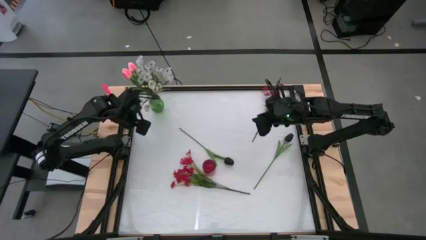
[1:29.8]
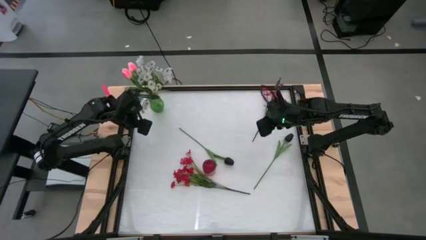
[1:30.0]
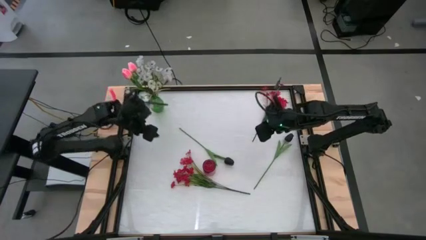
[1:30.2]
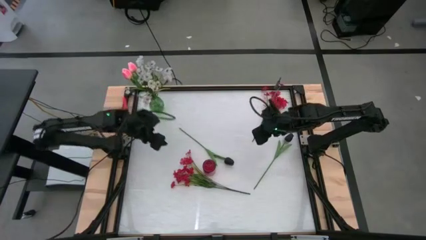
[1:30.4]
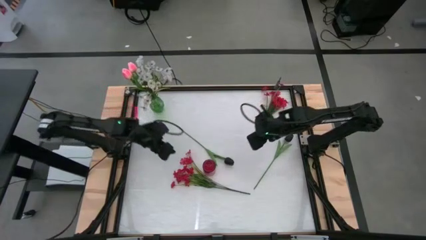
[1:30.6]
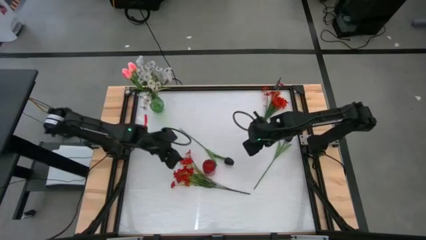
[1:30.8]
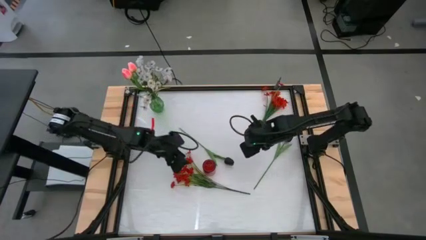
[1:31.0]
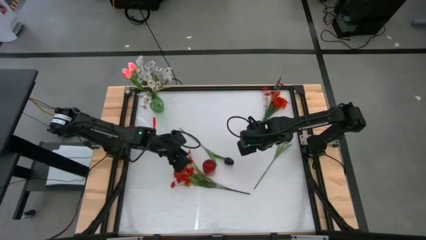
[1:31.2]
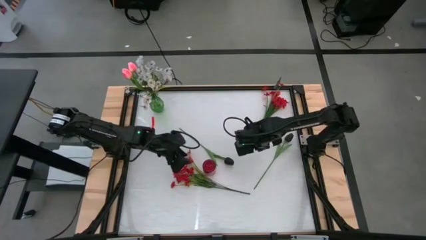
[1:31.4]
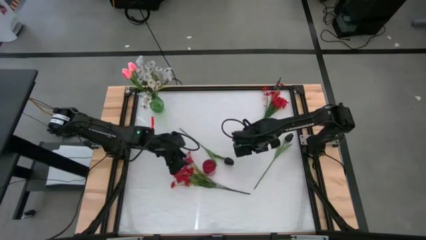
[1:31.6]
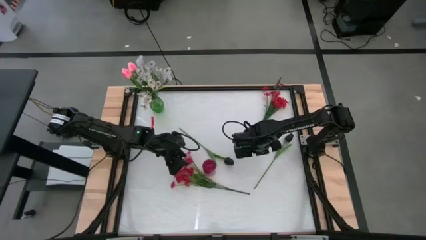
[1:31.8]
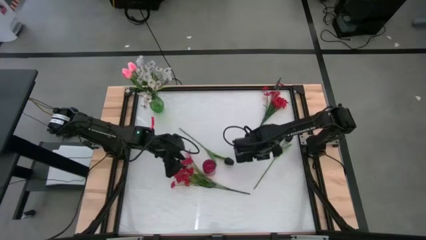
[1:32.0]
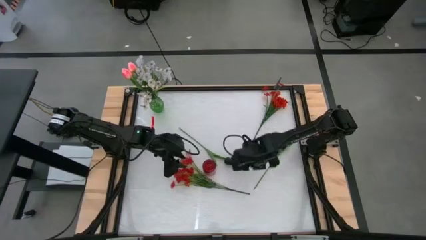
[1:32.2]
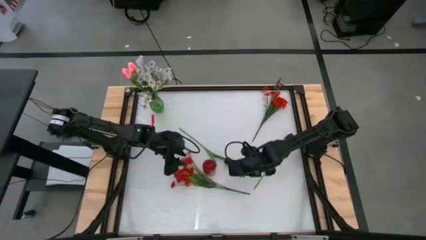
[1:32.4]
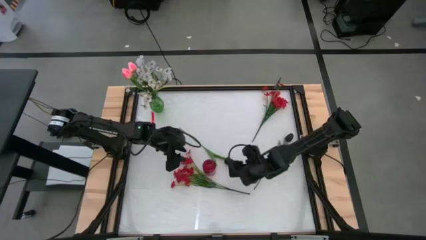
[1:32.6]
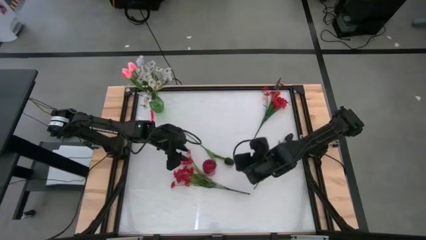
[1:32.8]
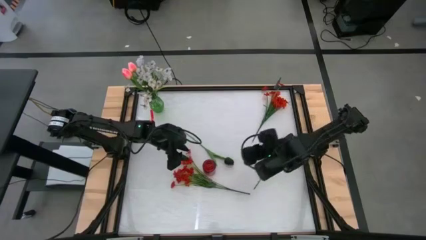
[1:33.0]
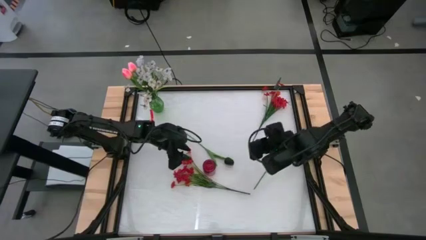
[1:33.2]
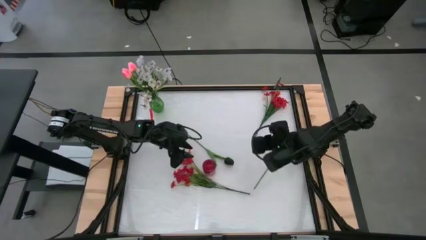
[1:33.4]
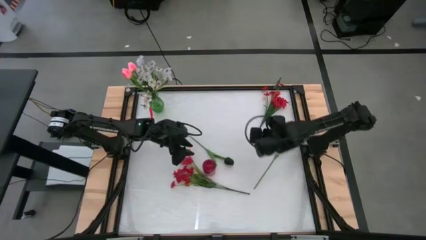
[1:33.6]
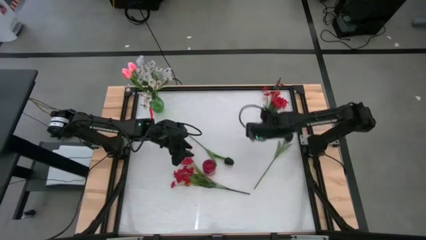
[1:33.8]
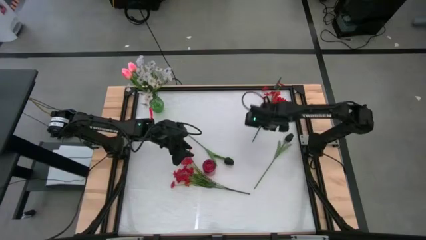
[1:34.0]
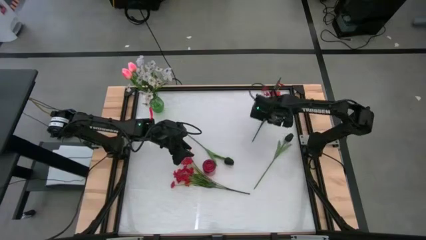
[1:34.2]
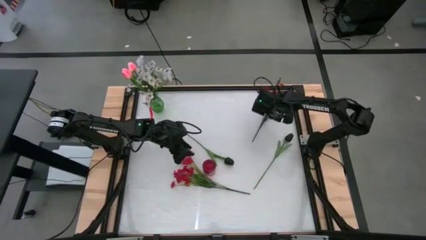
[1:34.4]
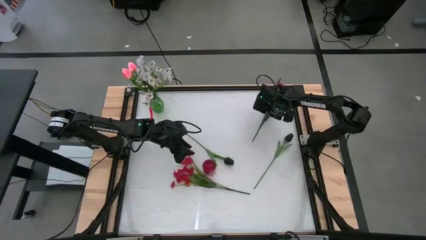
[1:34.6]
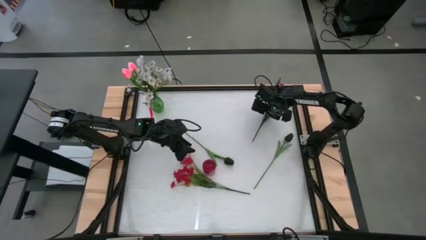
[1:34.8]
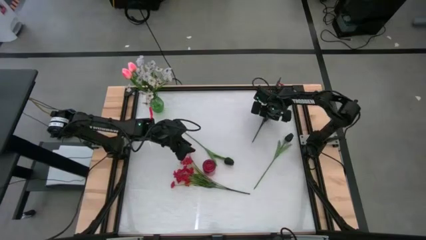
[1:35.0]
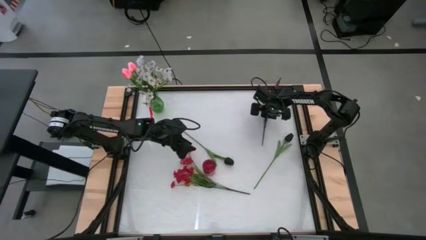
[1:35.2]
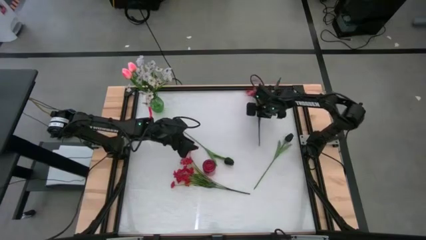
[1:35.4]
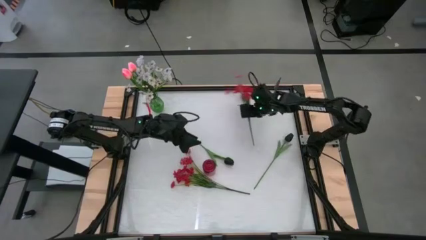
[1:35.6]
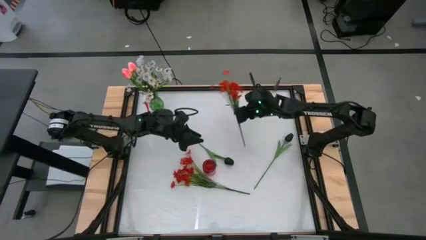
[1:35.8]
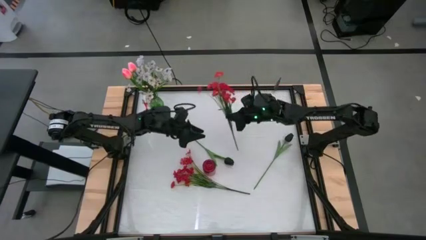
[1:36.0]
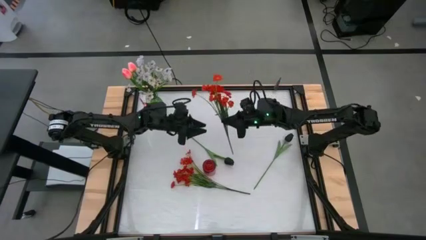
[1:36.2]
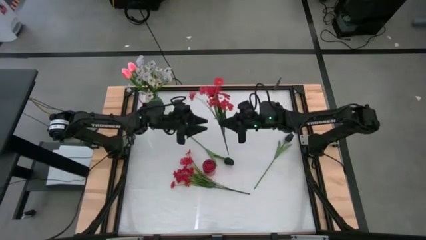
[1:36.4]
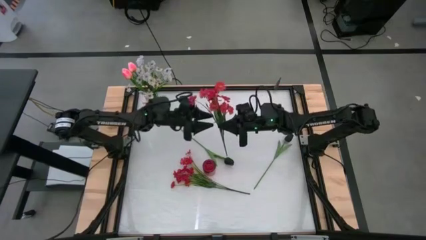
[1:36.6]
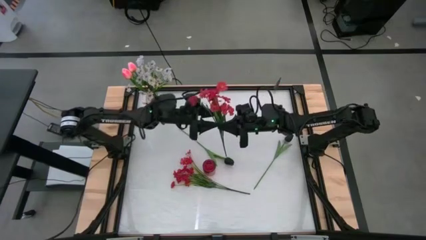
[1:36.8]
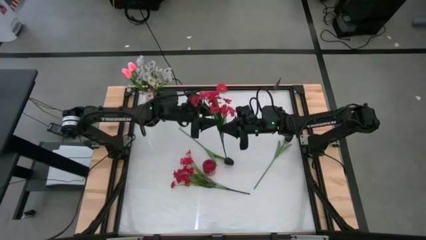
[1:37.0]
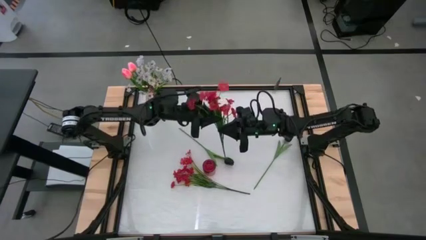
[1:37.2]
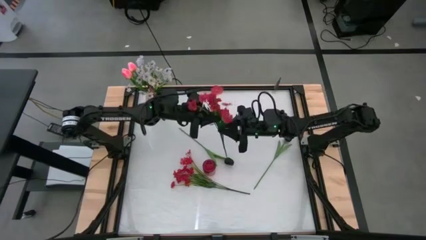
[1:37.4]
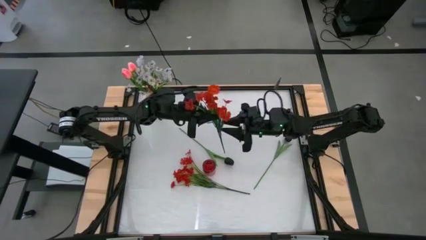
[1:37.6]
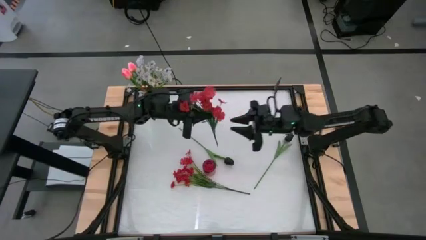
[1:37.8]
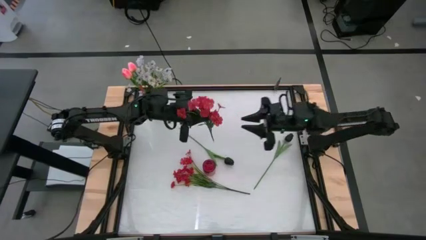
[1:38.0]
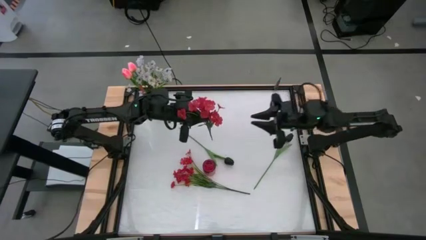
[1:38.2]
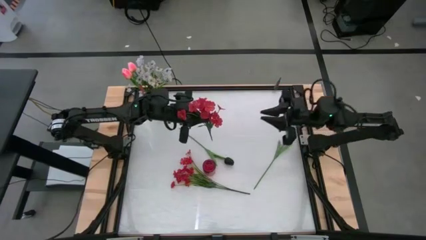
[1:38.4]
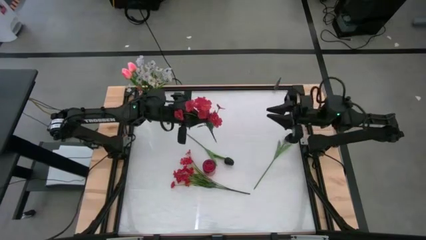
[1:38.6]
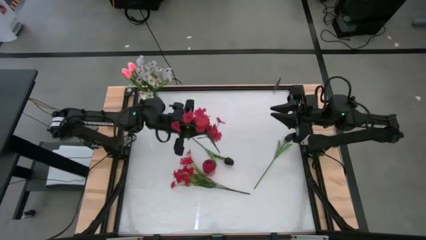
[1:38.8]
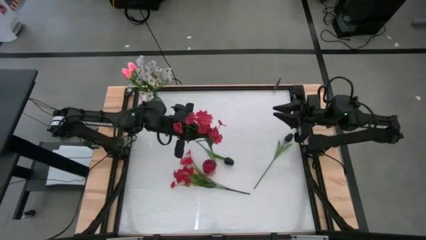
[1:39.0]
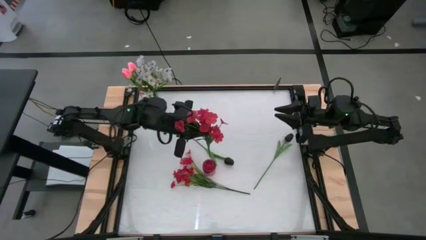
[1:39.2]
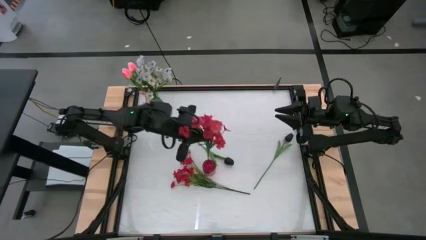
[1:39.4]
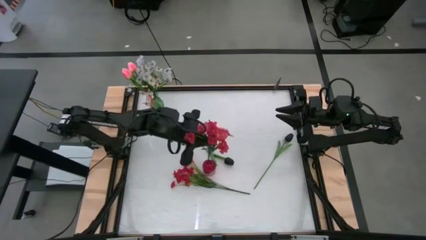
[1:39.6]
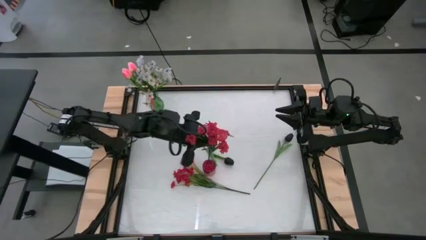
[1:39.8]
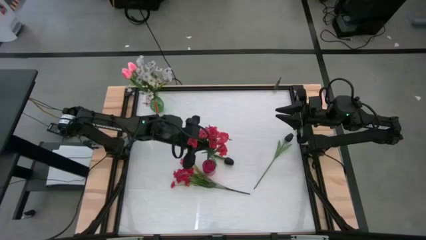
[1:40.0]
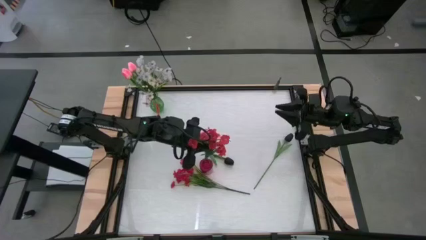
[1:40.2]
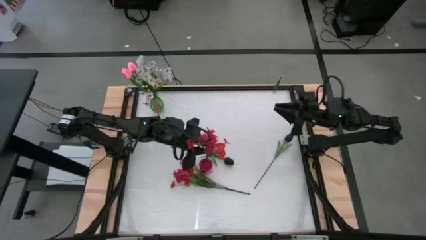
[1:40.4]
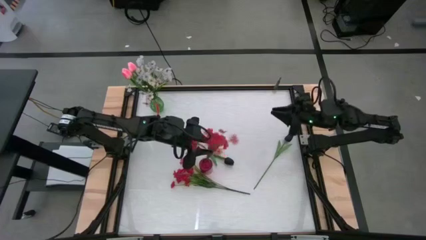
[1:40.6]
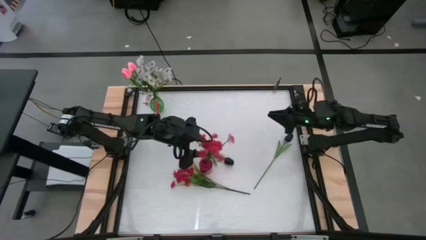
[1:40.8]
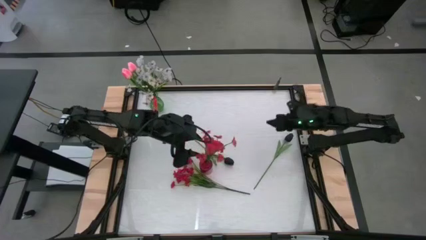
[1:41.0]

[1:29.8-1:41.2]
Task: Sort flowers into vase by color
Put the top red flowers into the red flower vase

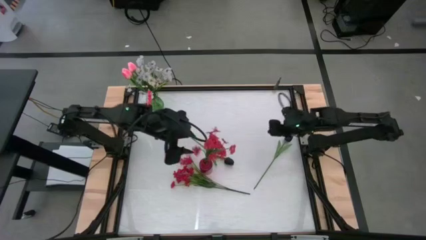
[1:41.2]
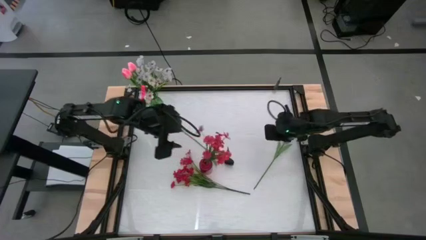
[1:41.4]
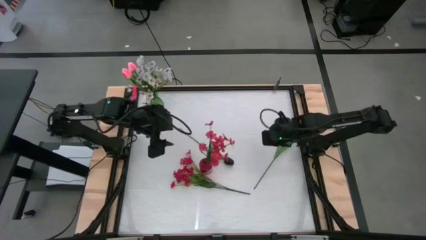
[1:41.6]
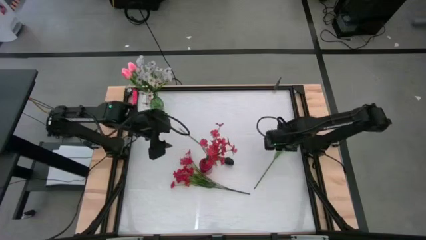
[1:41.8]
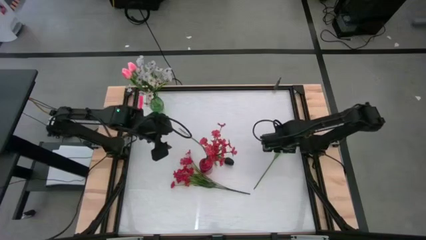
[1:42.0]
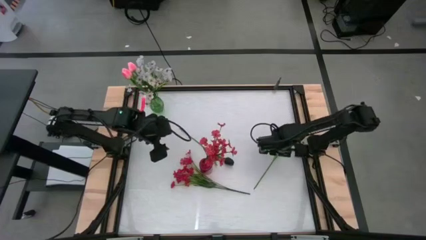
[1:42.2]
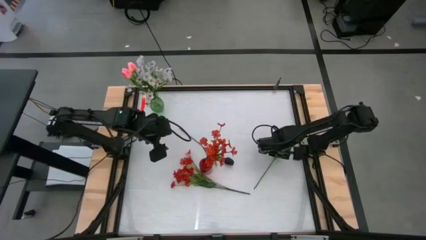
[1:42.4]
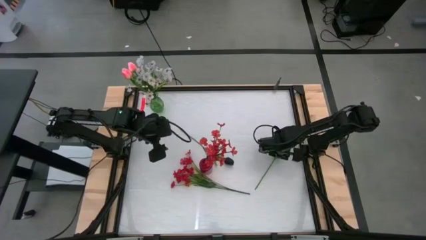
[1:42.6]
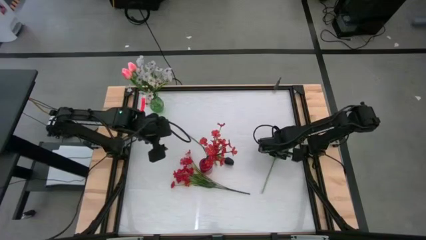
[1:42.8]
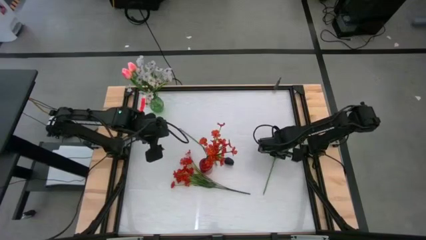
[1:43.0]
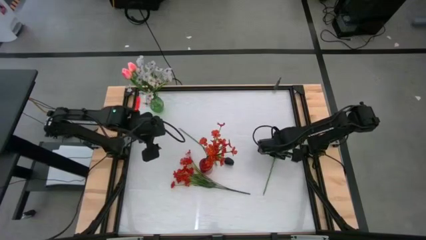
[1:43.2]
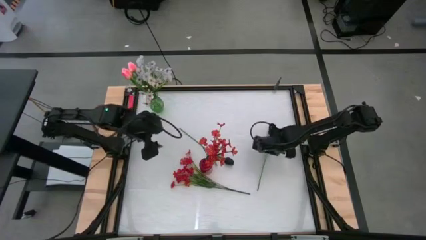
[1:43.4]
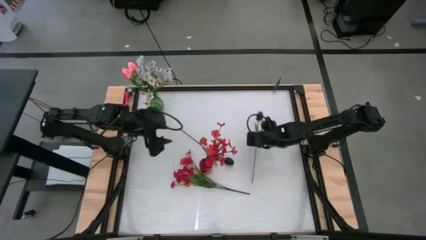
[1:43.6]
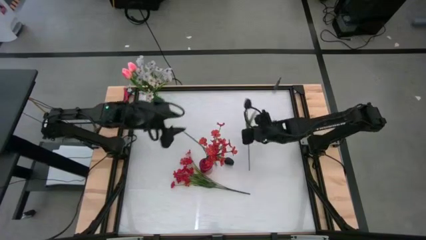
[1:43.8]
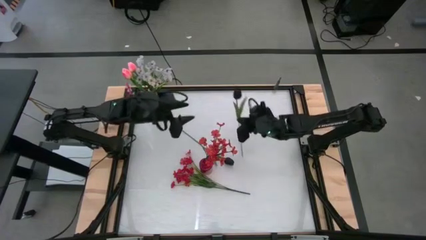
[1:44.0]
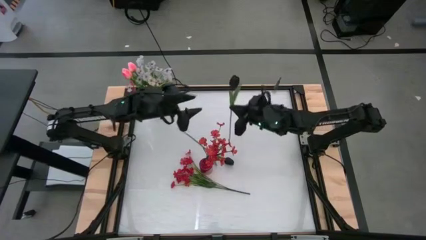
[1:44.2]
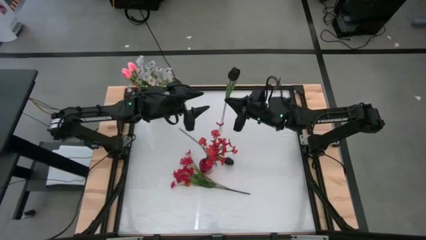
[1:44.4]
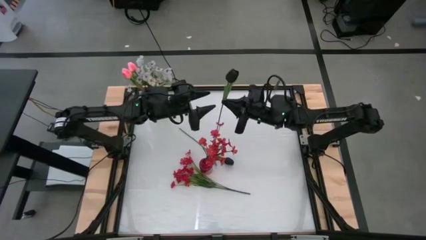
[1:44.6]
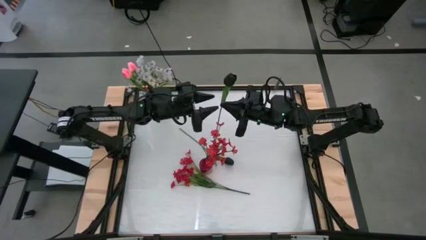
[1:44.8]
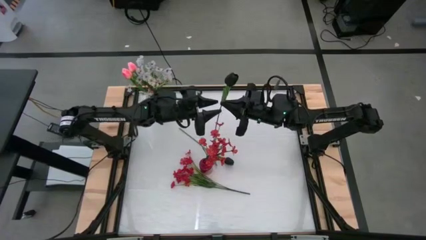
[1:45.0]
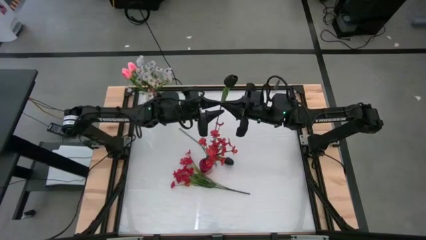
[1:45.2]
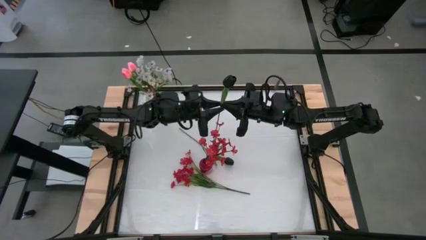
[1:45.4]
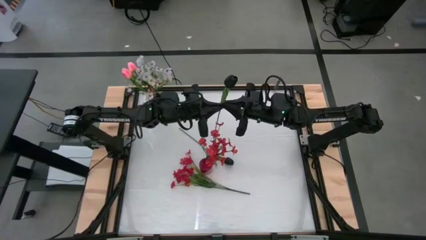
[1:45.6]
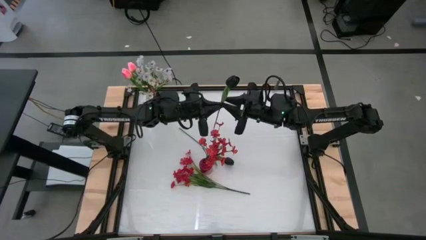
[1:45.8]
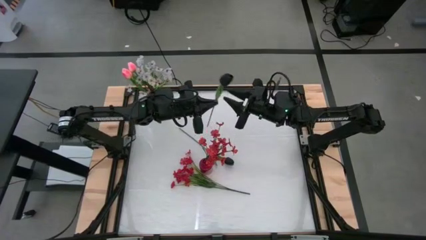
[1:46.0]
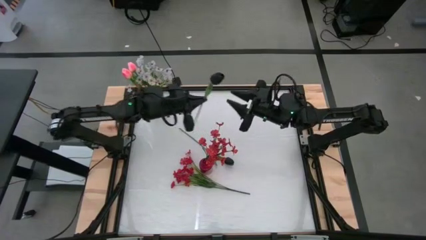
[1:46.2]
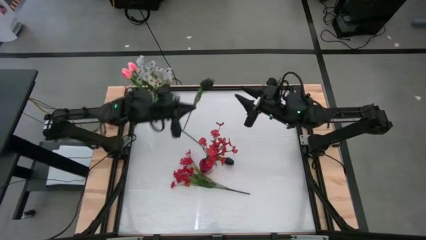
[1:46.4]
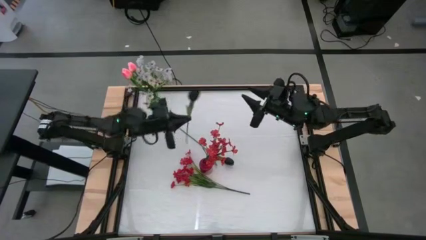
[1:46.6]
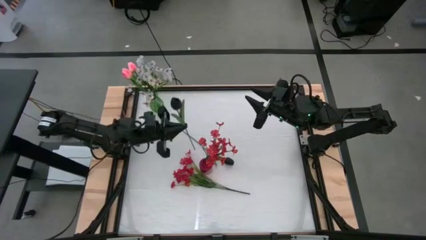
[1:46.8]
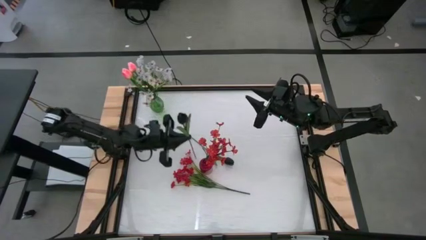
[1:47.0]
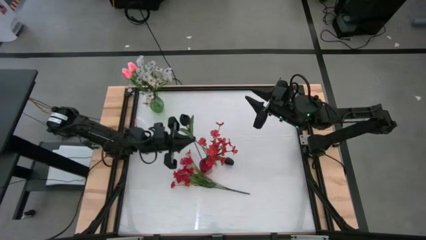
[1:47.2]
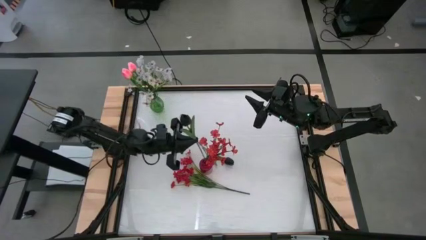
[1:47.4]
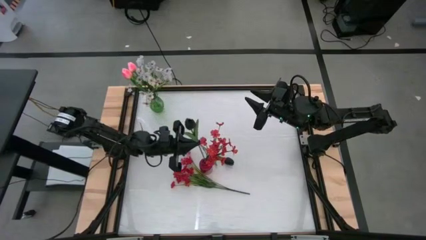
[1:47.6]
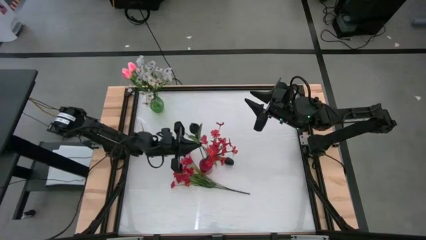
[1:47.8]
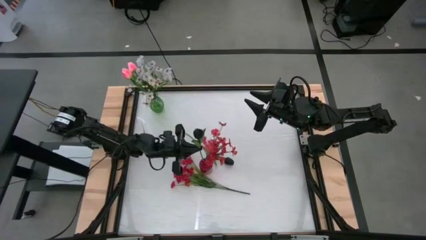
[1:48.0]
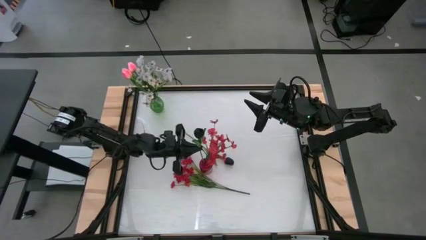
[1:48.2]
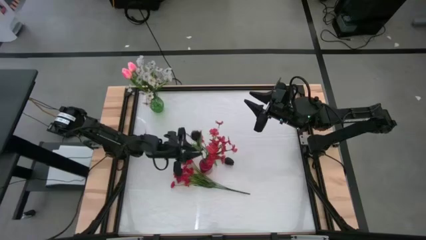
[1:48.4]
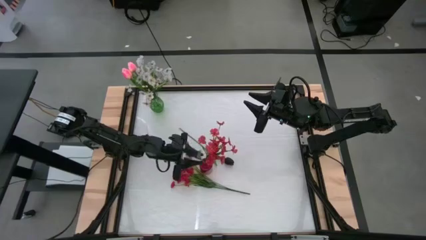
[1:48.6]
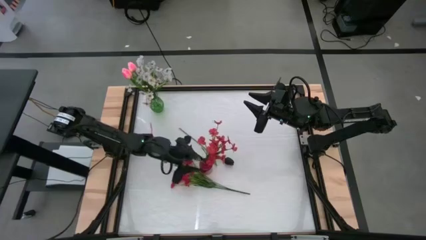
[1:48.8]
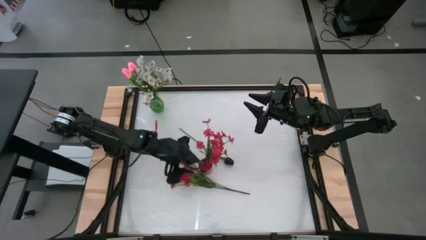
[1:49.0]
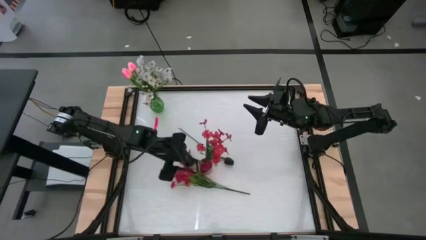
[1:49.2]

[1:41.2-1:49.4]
Put the right black flowers into the red flower vase
